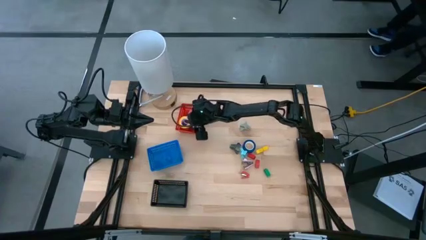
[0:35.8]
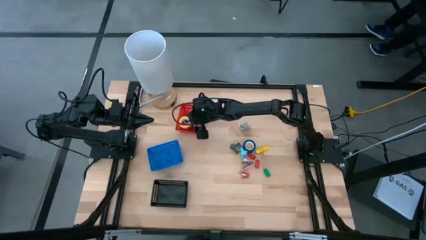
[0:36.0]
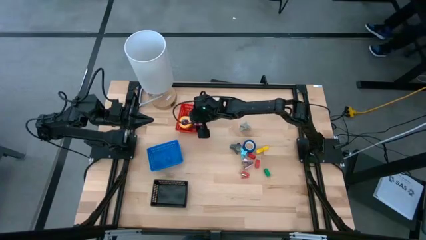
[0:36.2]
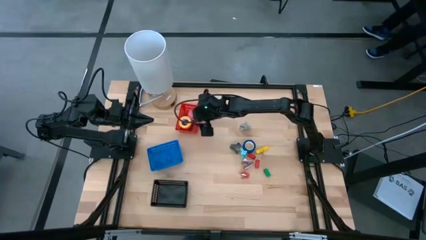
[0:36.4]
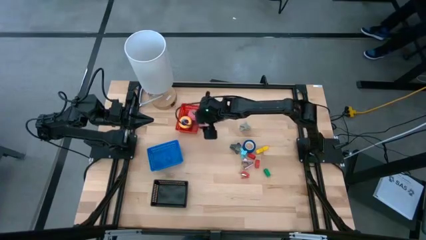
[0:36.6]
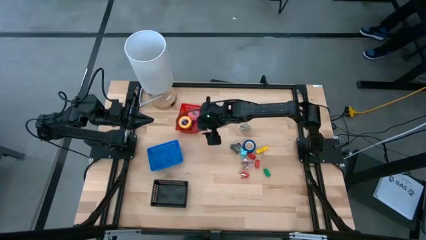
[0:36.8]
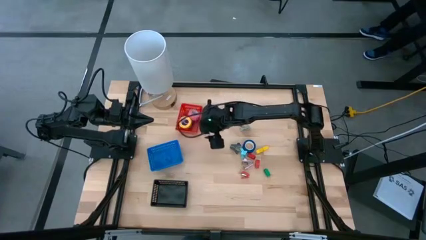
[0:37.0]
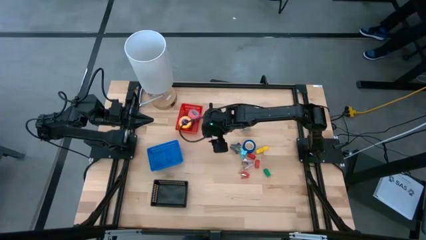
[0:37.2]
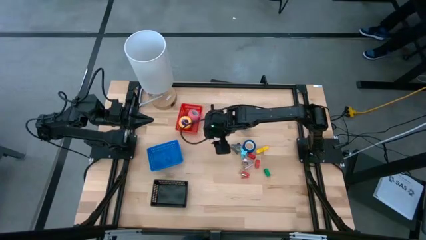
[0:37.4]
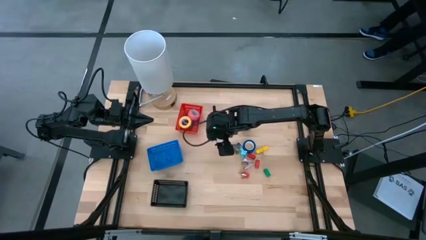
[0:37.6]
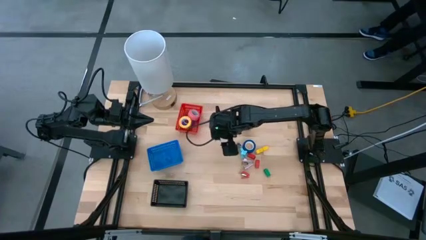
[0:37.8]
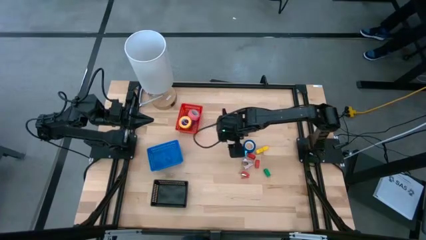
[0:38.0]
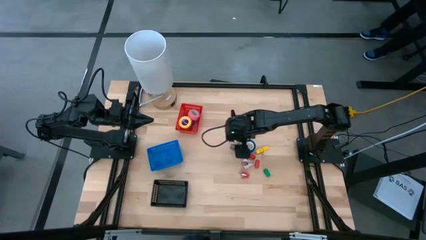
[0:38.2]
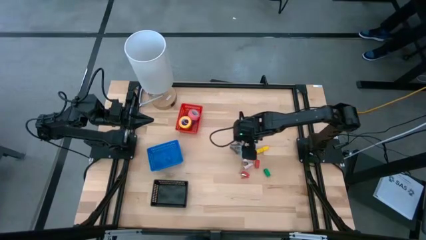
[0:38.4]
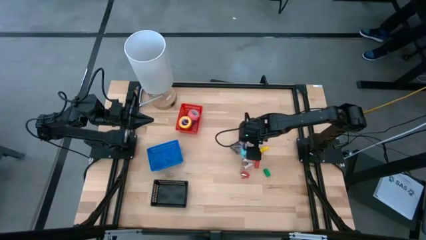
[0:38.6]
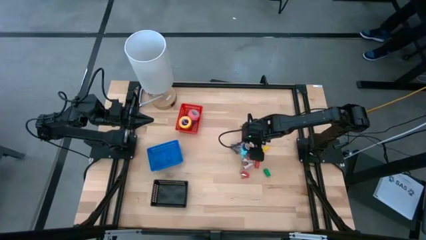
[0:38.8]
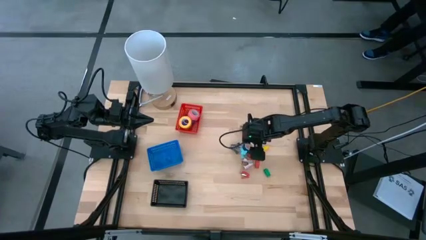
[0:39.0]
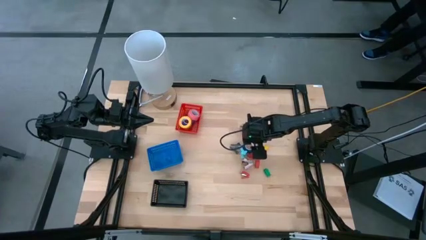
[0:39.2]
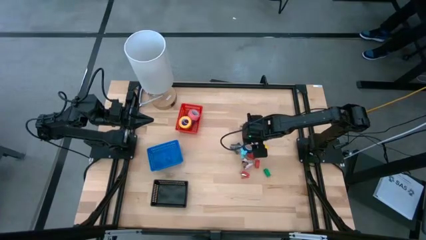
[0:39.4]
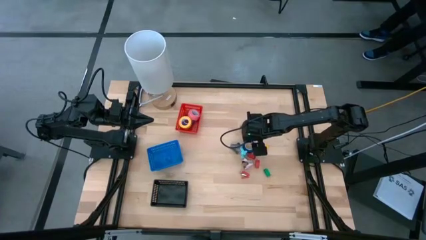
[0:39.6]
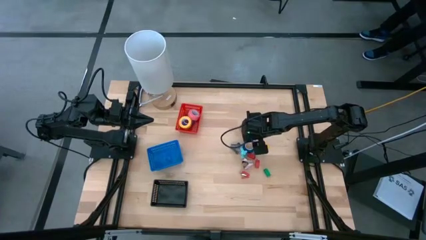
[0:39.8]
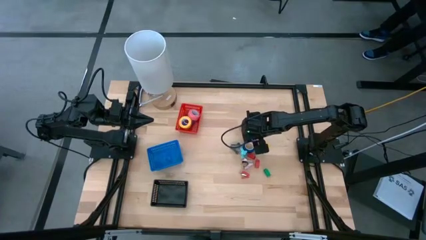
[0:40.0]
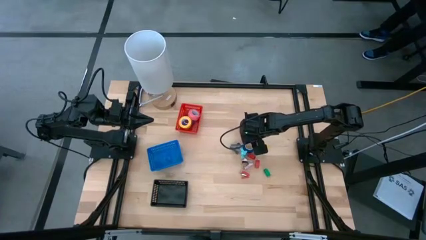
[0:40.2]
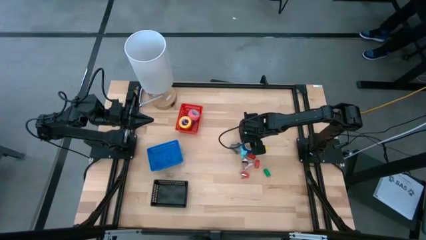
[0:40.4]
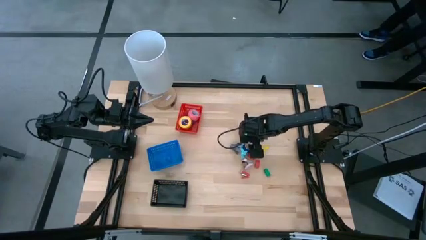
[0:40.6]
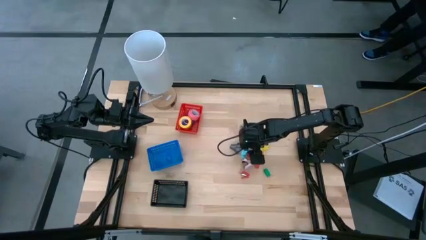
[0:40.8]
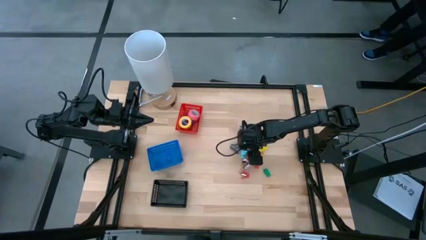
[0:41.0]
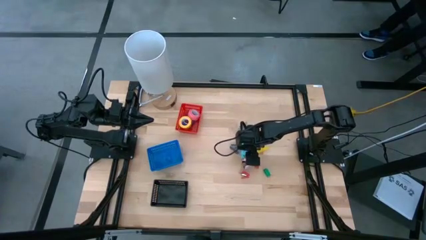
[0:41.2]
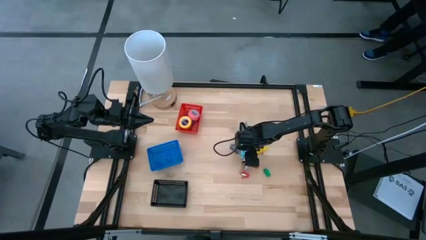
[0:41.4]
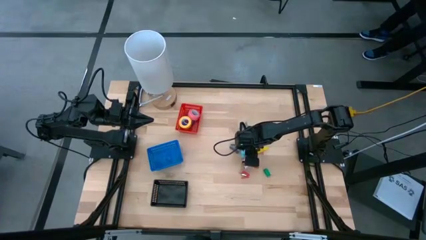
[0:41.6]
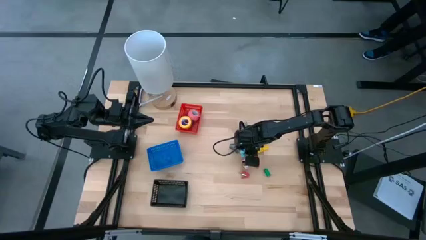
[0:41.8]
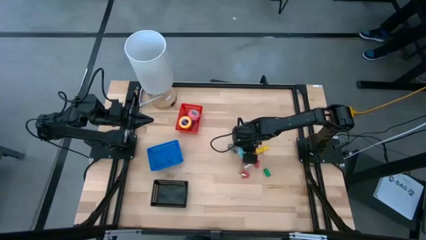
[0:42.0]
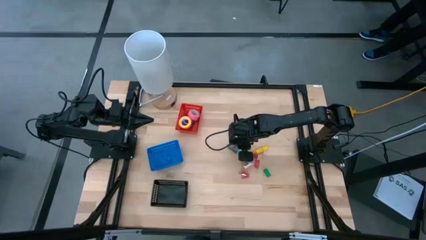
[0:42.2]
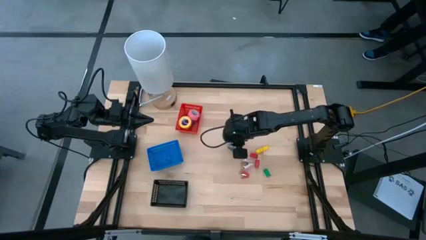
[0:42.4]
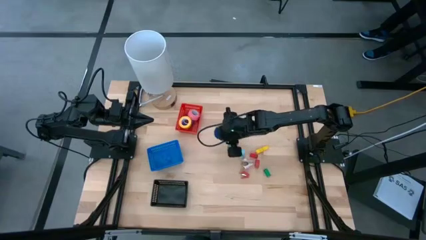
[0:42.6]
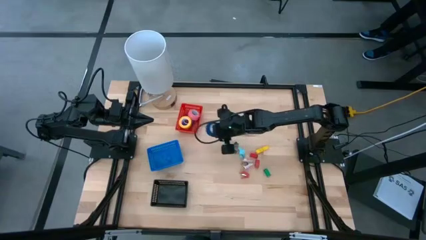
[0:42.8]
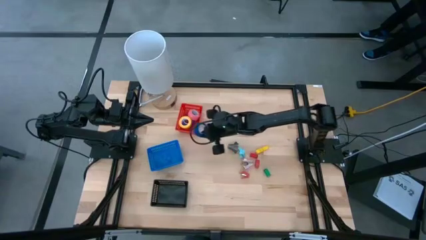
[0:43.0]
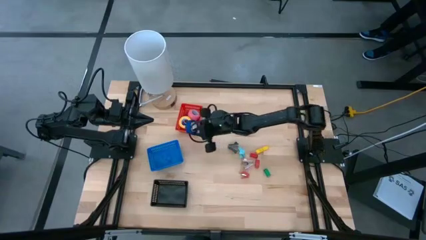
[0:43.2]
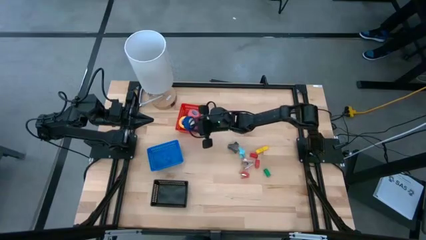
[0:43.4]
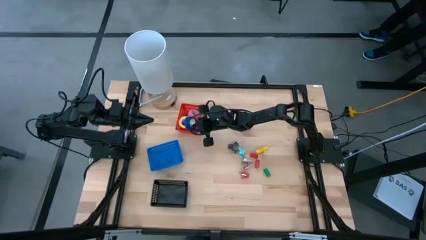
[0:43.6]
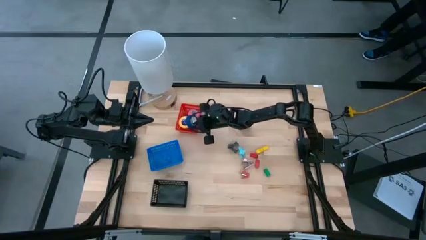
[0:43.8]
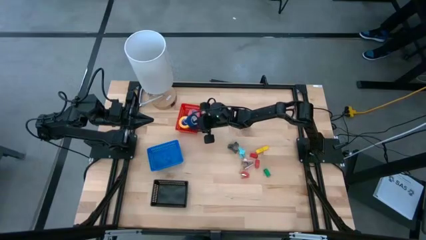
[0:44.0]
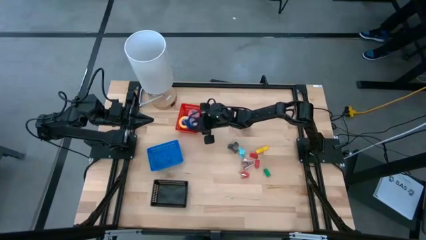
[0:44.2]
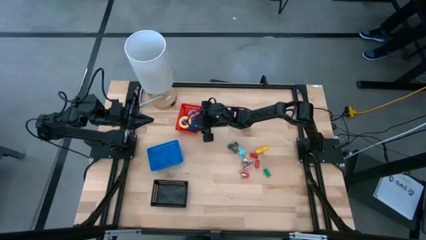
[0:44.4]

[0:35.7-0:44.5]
Task: Pick and place Stapler, Stapler remover, tape
Put the blue tape into the red basket

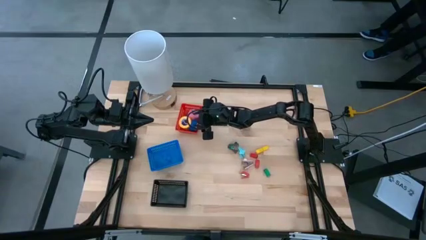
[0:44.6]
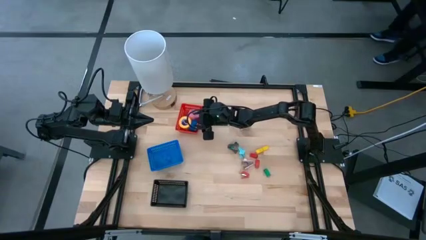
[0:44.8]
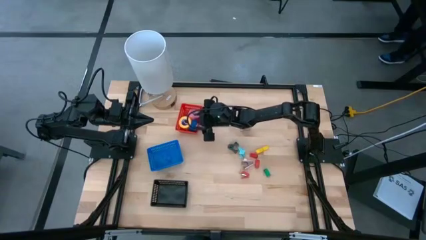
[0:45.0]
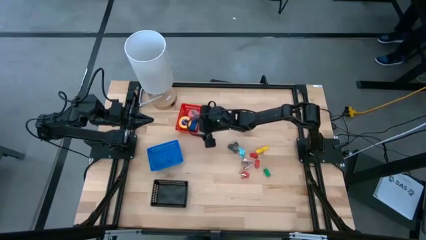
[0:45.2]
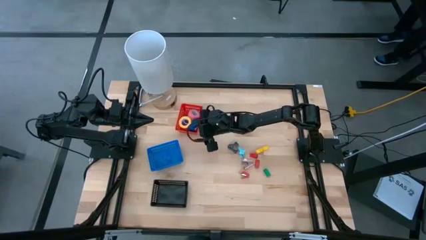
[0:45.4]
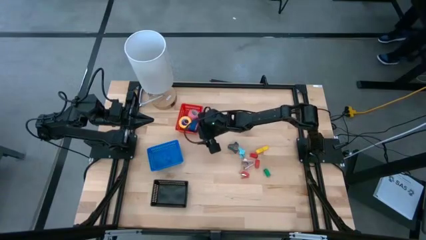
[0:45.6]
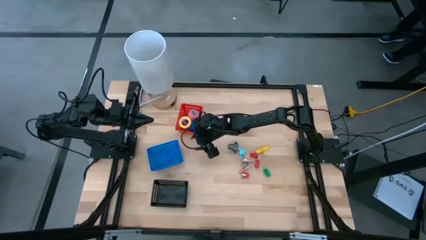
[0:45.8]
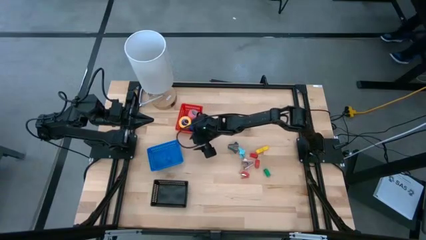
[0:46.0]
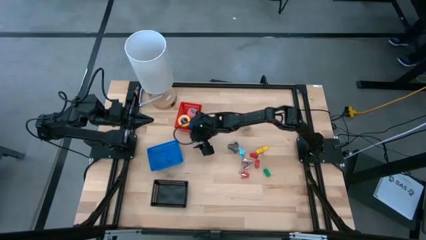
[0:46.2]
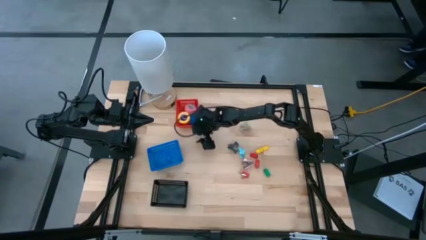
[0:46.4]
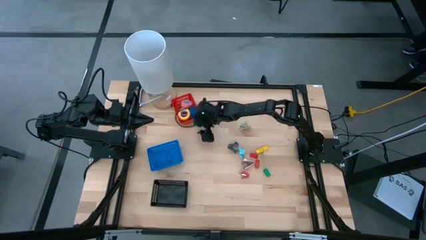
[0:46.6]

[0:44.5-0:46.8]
Adjust the red basket on the shelf

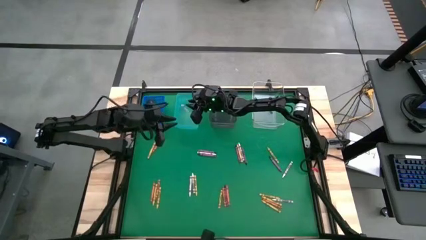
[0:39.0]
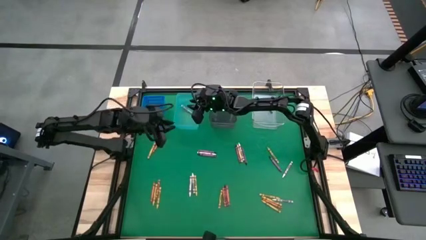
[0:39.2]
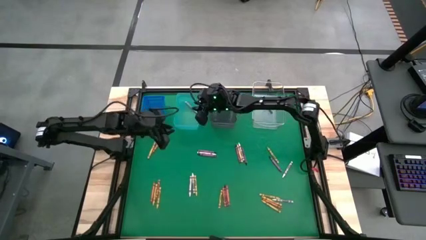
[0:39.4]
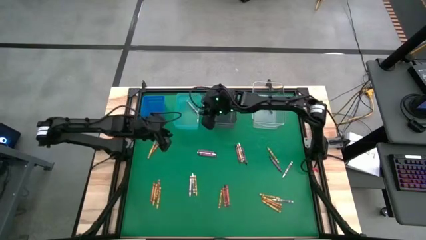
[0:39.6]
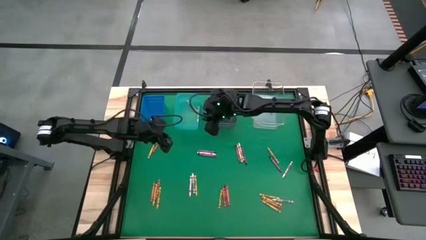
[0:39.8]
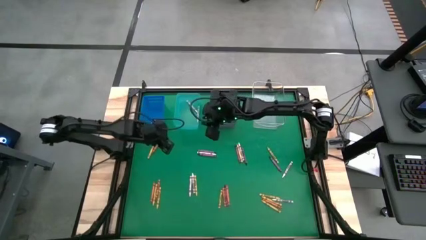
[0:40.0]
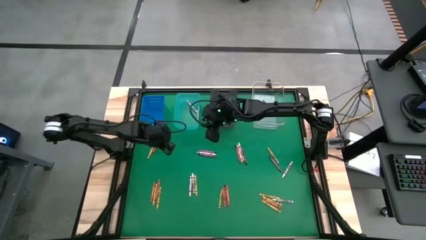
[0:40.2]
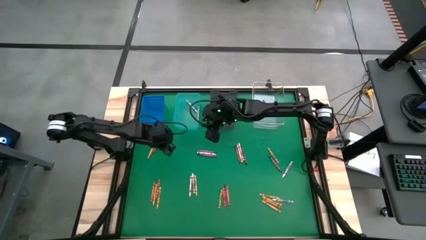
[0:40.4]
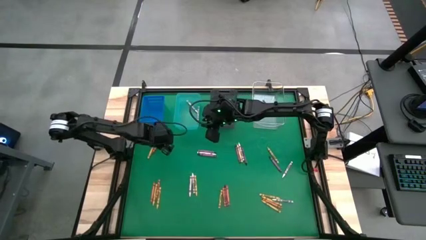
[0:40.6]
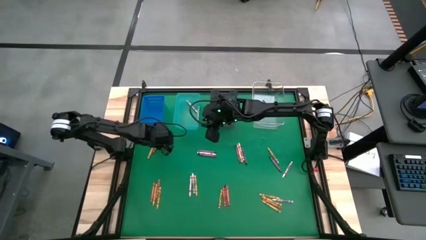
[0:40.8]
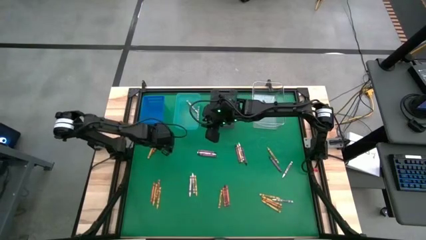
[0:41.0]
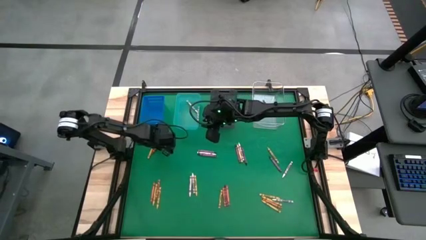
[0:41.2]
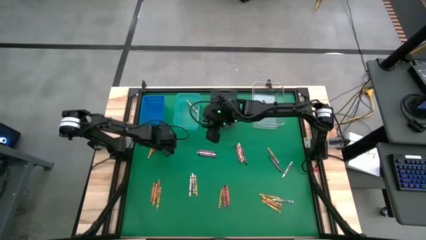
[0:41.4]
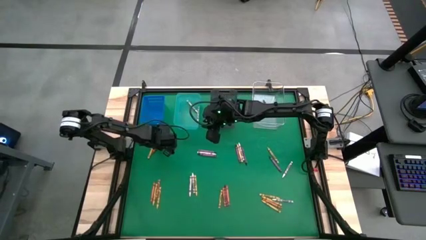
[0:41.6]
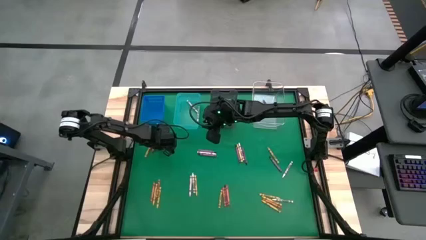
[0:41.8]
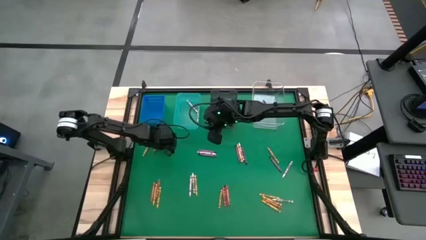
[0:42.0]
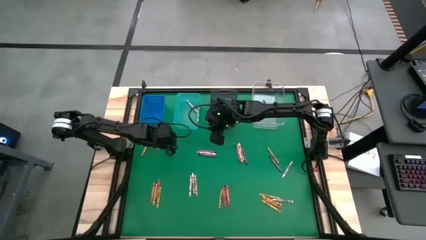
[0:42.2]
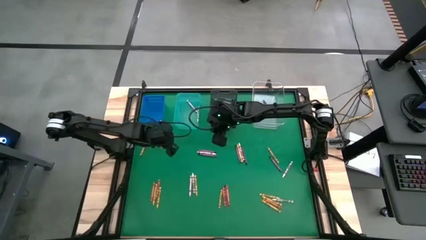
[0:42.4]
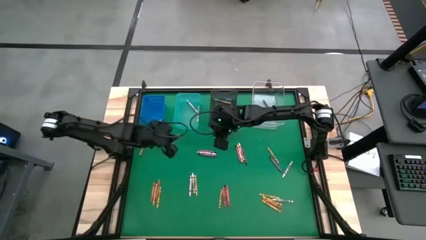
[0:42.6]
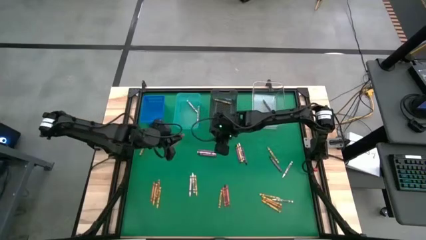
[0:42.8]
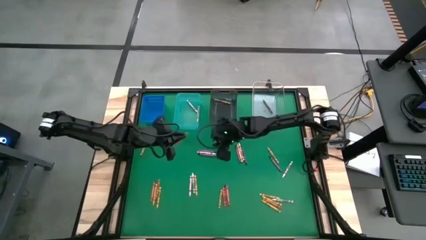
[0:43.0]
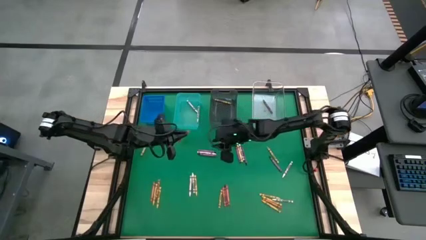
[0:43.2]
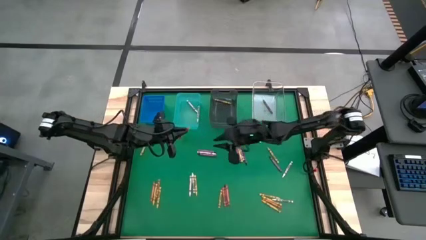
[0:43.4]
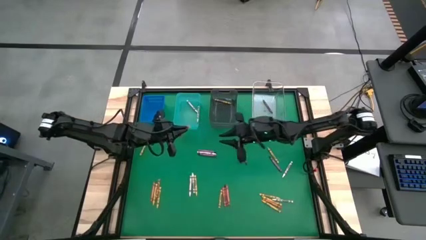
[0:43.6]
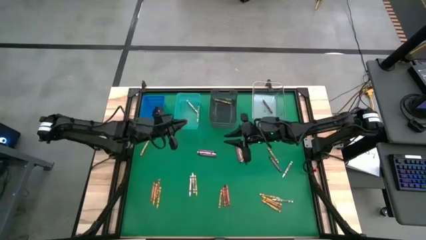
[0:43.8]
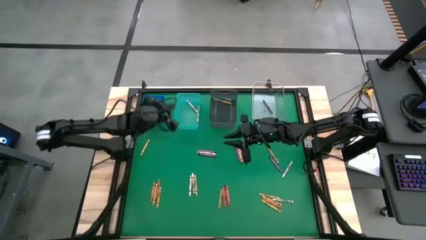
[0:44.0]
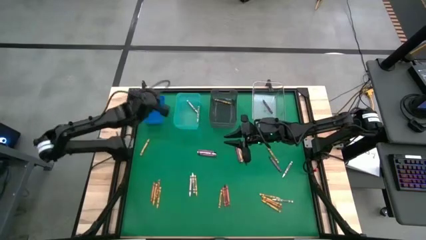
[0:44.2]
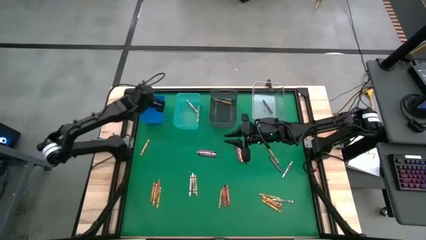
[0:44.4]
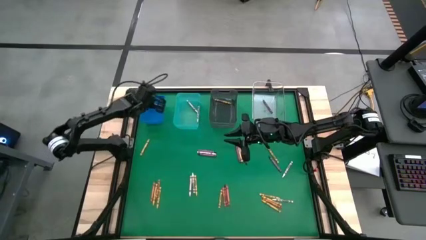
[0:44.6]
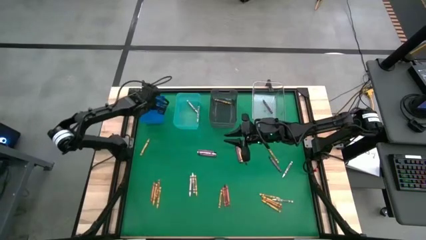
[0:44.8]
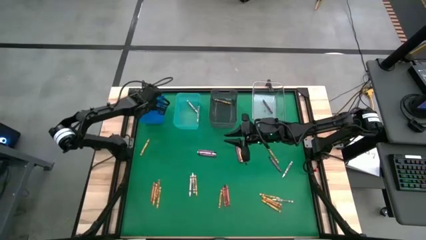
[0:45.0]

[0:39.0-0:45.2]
Task: Sort crayons
Put the red crayon into the blue bin
